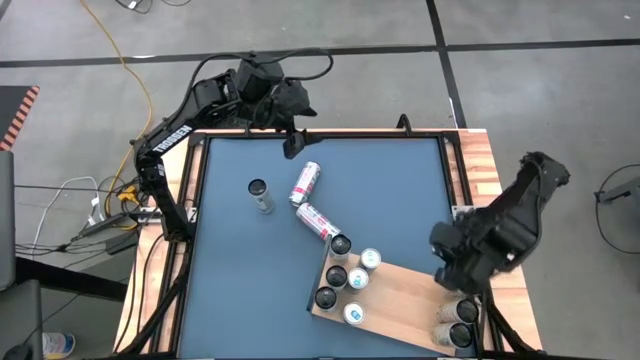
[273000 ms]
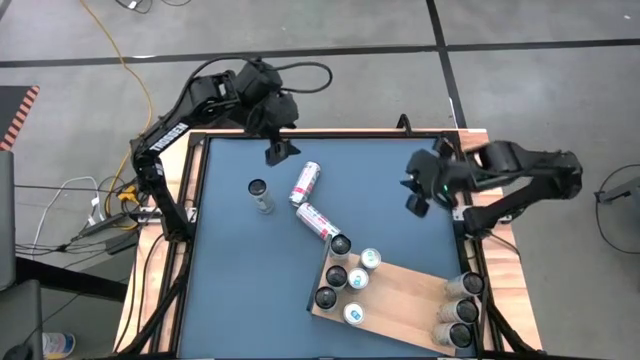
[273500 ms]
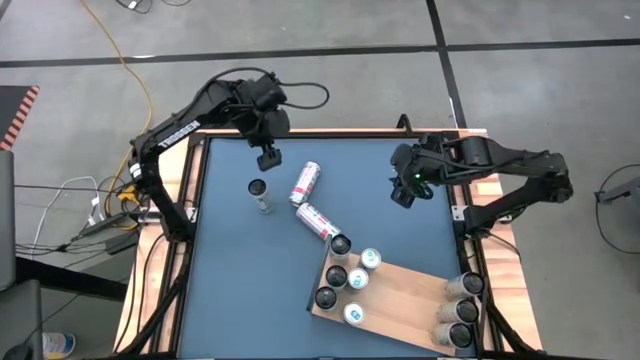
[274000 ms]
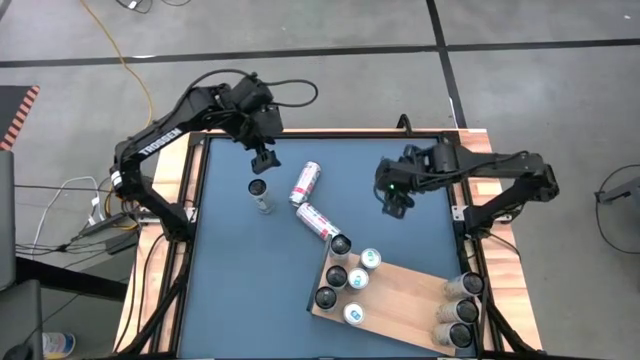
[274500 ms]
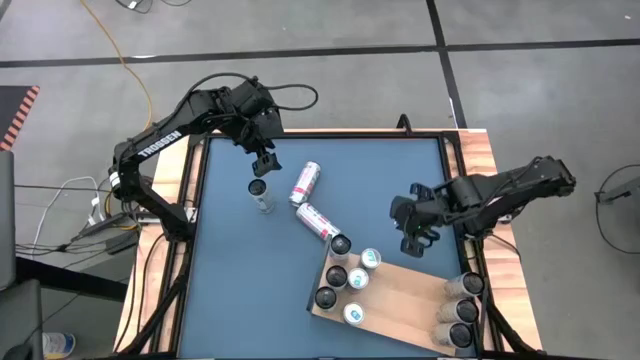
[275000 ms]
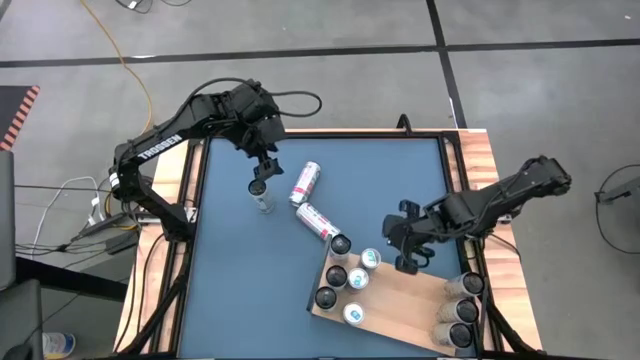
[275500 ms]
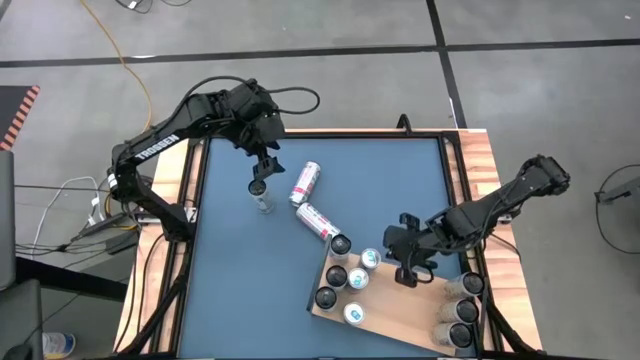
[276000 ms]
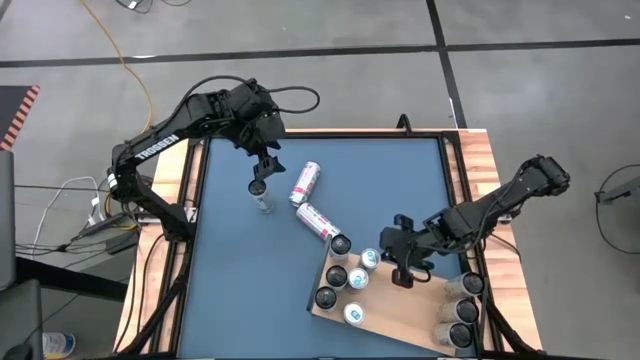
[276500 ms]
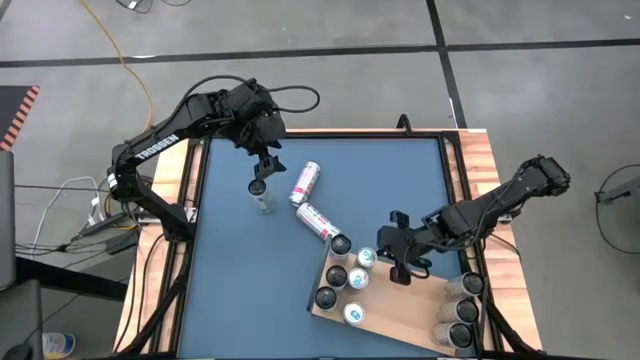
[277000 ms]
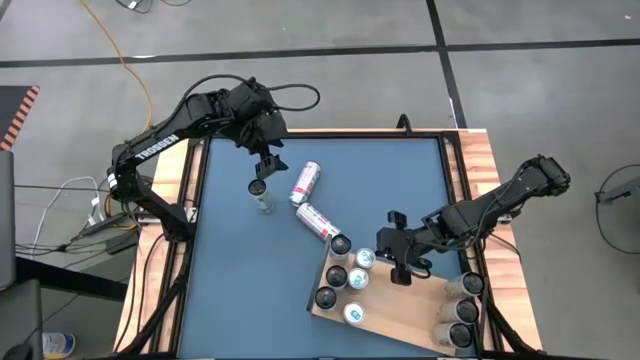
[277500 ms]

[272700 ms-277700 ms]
Task: Place canned beverage on shelf
Adjust the blue soda can on the shelf

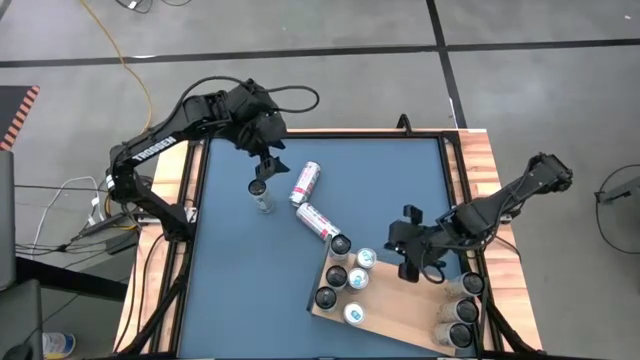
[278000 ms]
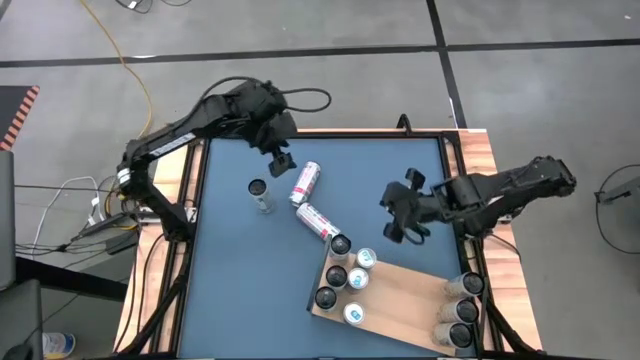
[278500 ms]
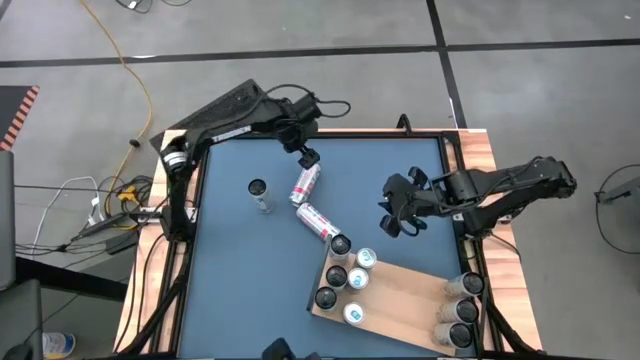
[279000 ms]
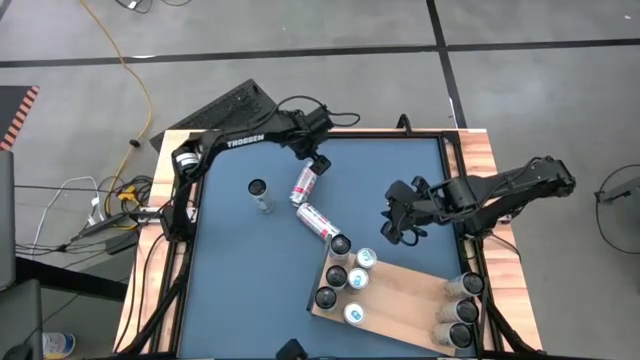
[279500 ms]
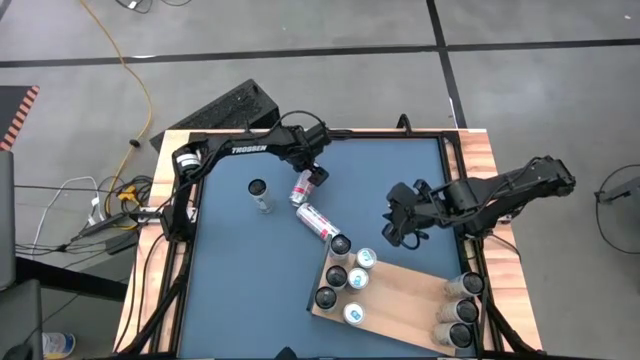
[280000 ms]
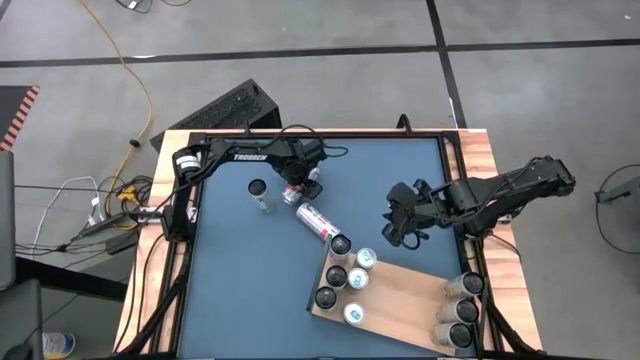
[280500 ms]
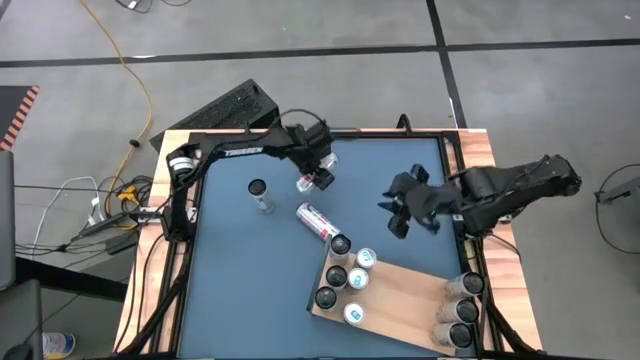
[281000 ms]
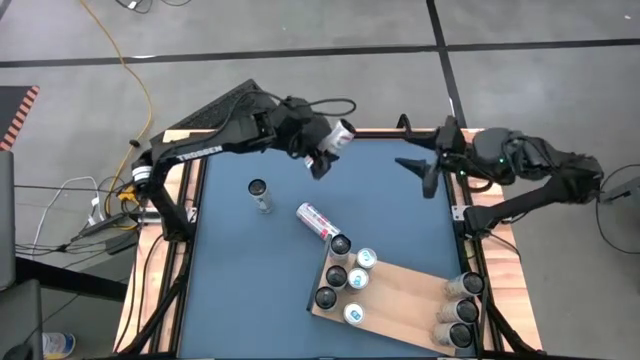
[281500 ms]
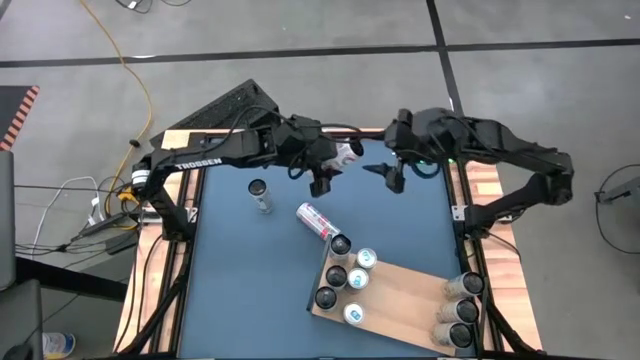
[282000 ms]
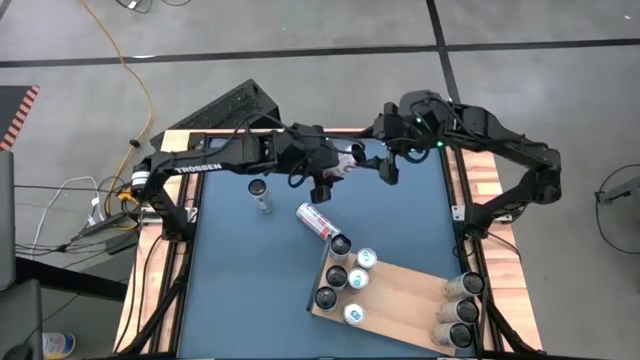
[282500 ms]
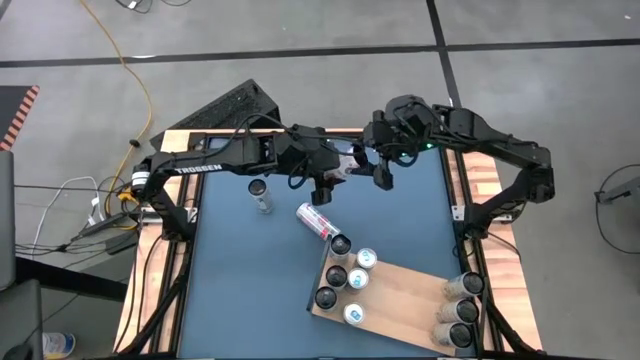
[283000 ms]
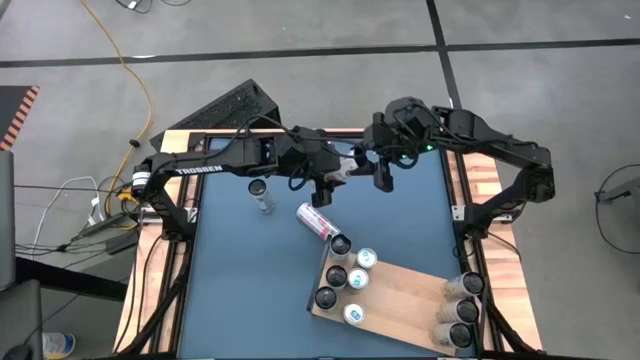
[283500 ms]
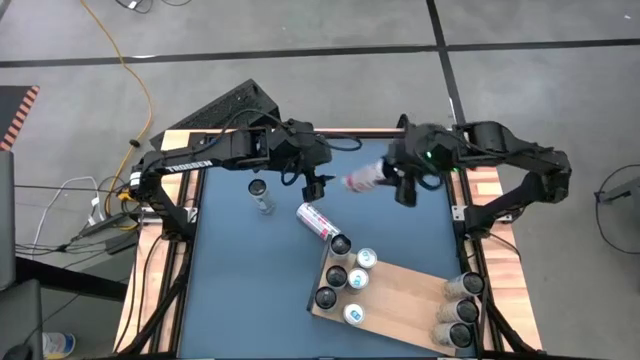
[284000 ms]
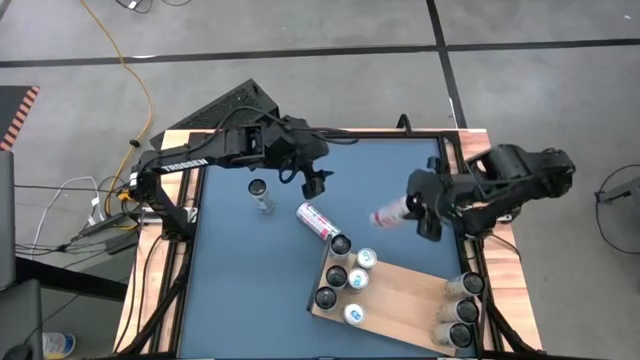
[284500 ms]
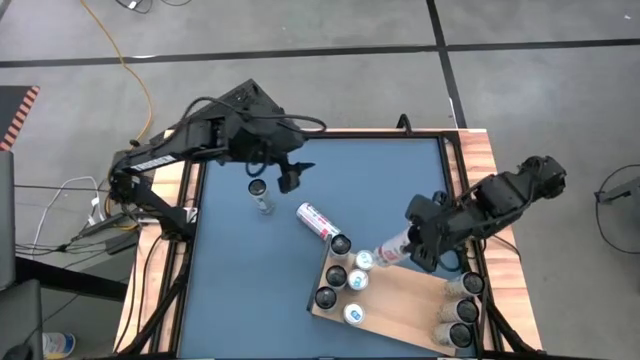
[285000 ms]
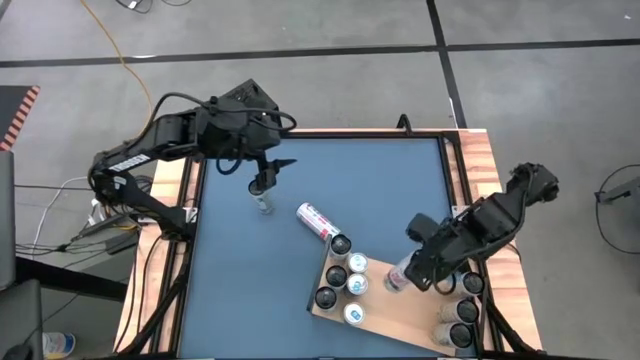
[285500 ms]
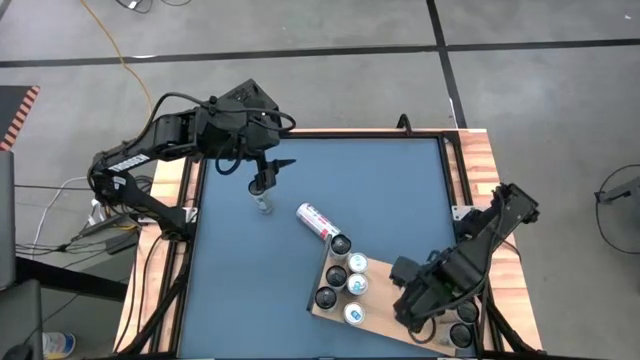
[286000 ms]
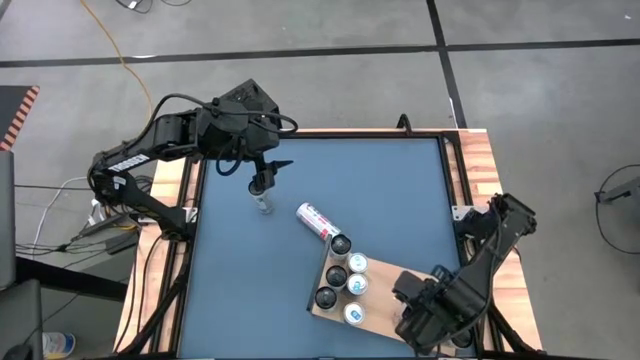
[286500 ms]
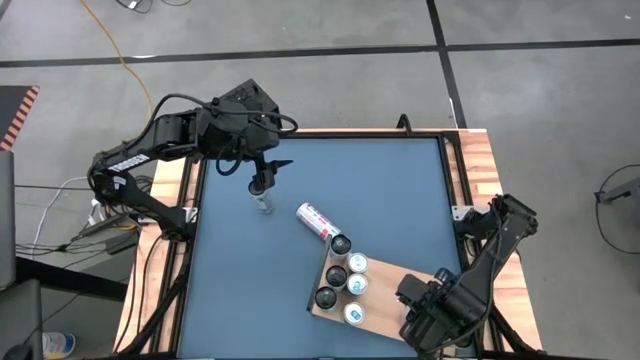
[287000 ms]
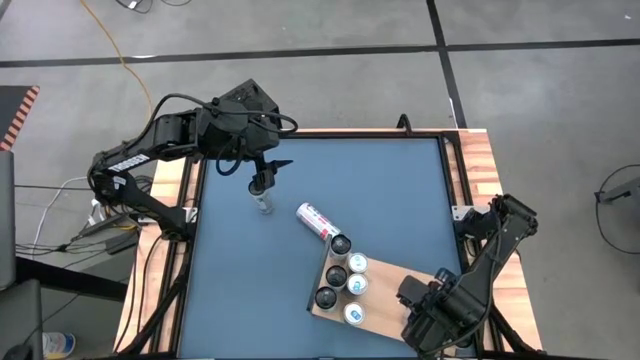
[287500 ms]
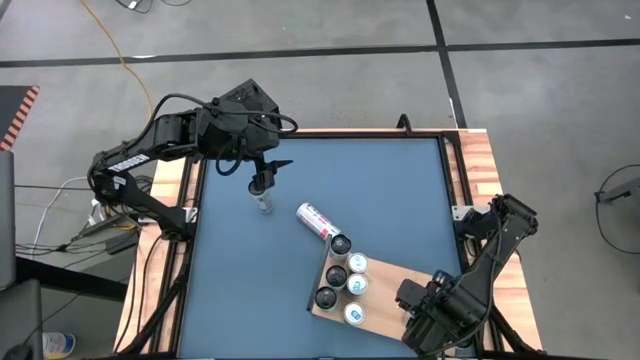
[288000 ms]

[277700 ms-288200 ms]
Put the top right white pink soda can on the shelf

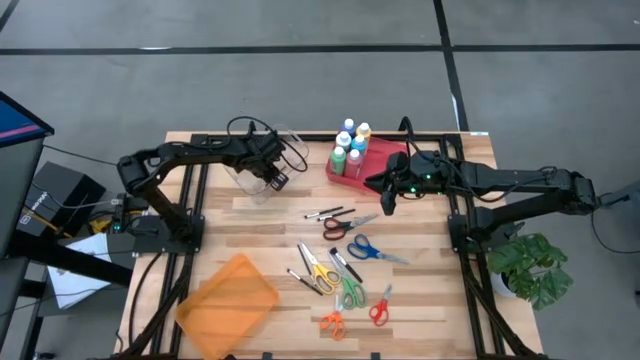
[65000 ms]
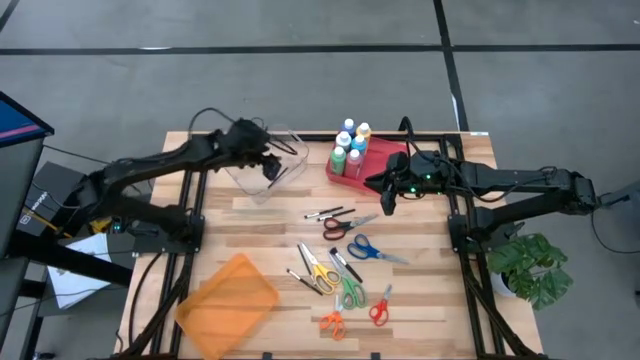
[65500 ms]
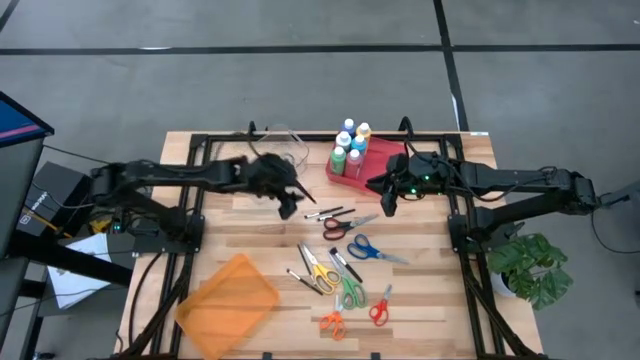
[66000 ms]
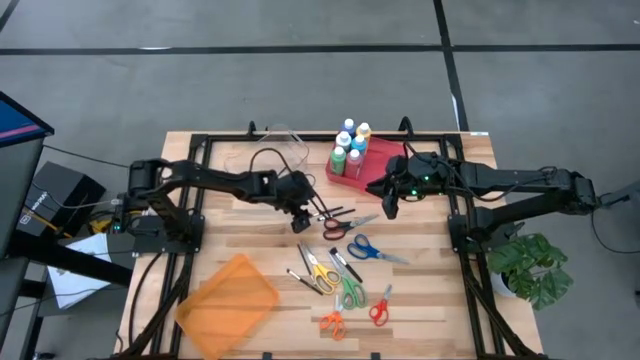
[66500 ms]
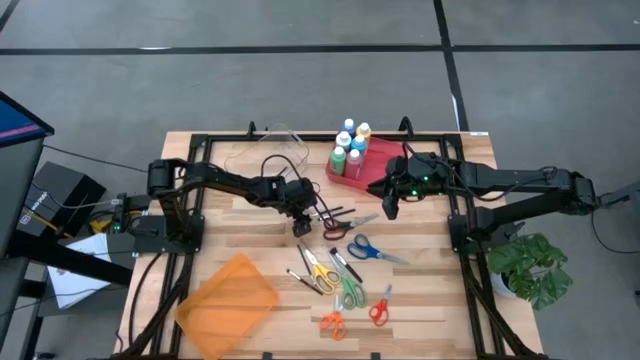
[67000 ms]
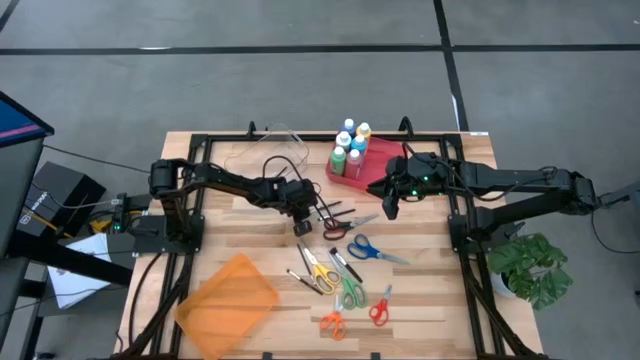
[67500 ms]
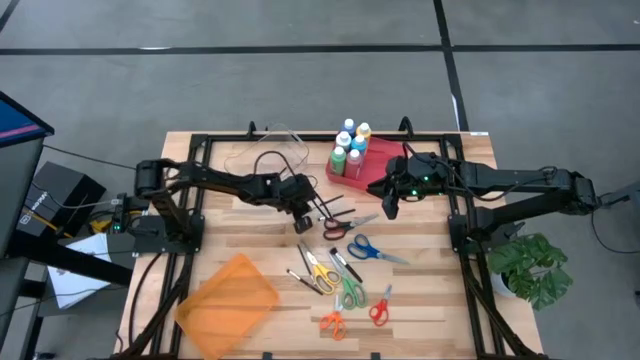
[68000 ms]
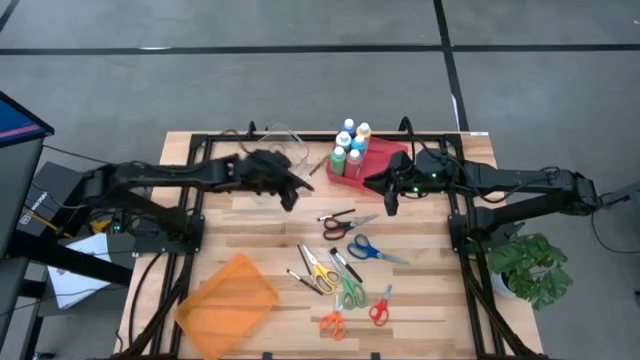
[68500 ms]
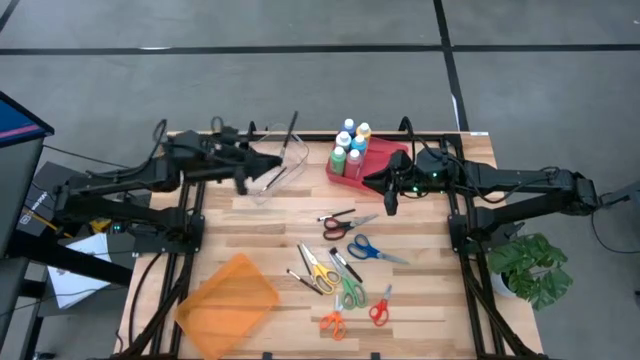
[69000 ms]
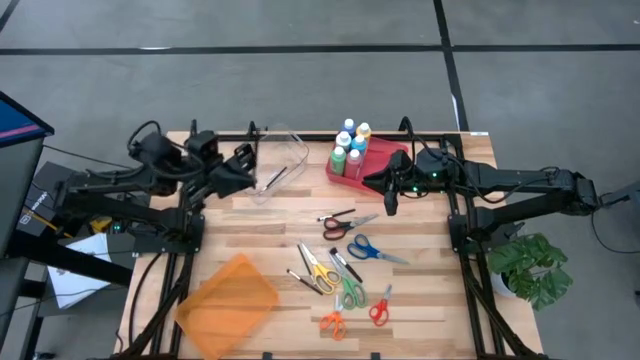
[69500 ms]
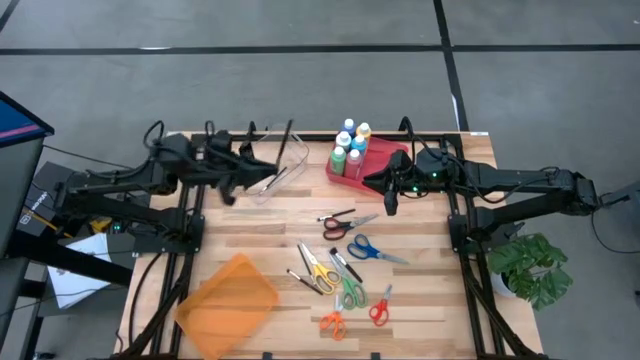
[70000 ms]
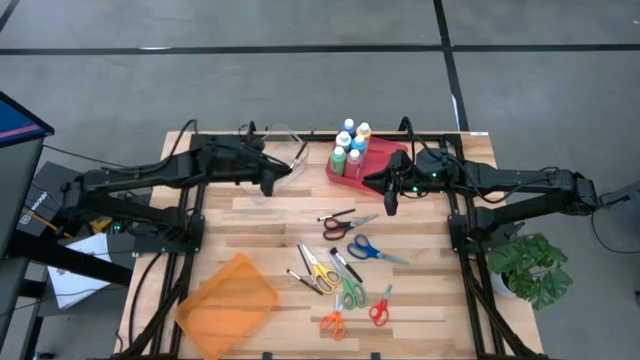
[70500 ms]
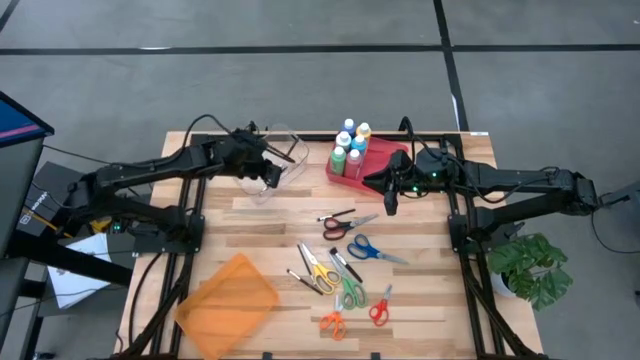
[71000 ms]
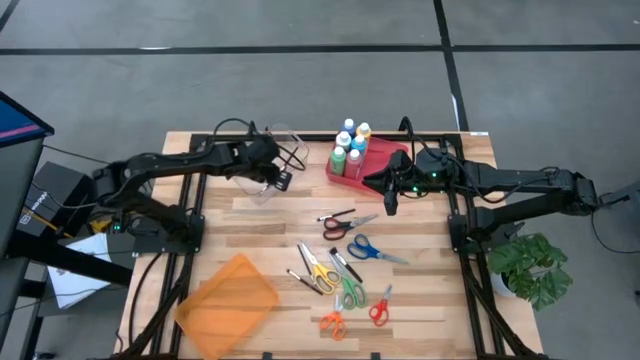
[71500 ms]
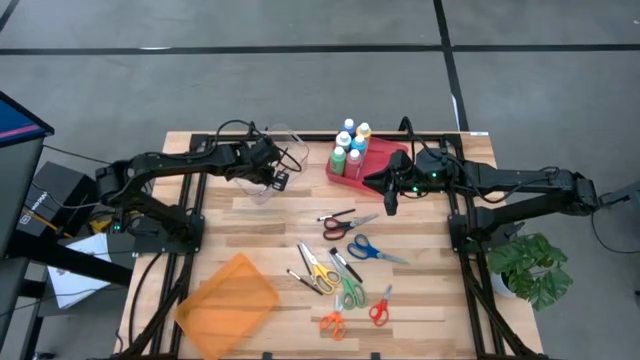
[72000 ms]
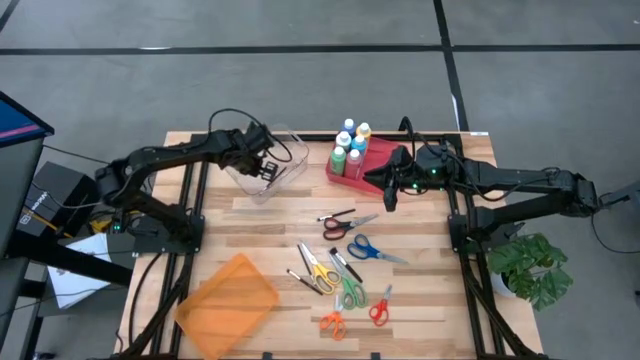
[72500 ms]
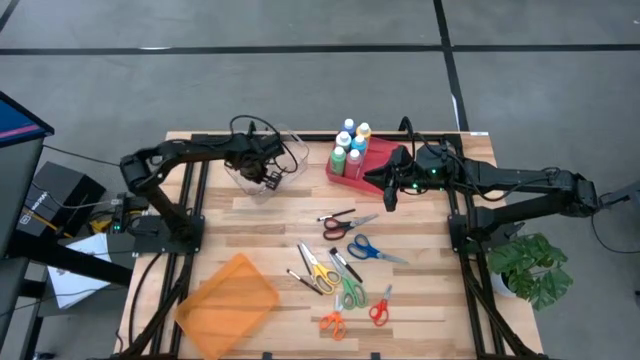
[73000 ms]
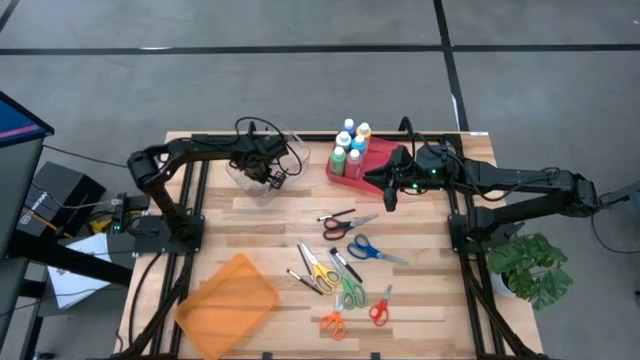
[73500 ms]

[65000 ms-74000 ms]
Task: Pick & Place Paint Supplies
Put the black paint brush into the transparent bin
